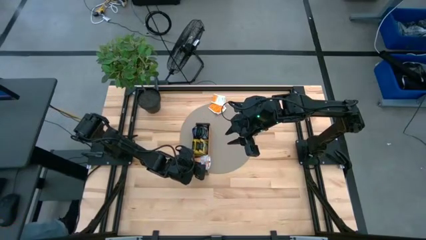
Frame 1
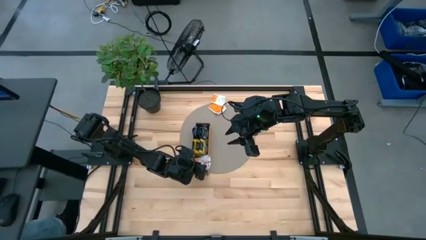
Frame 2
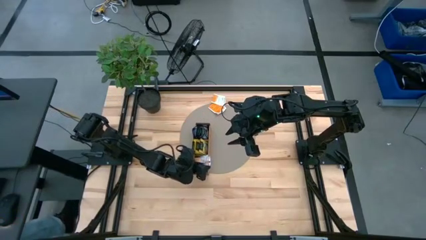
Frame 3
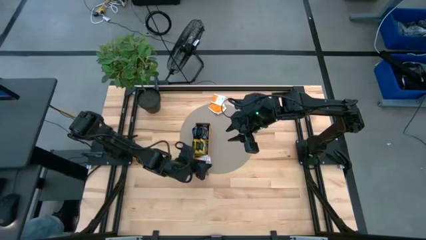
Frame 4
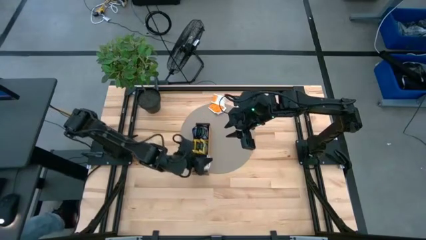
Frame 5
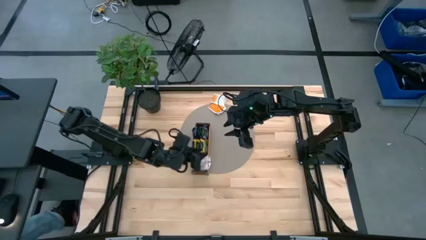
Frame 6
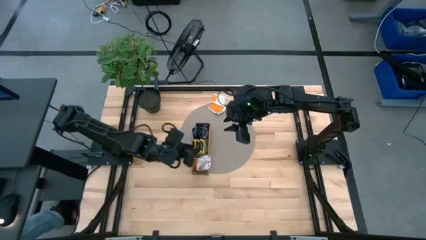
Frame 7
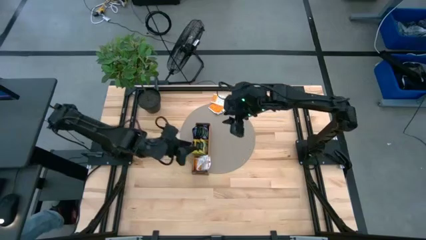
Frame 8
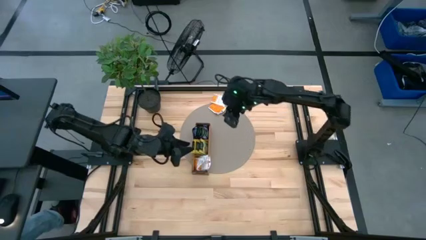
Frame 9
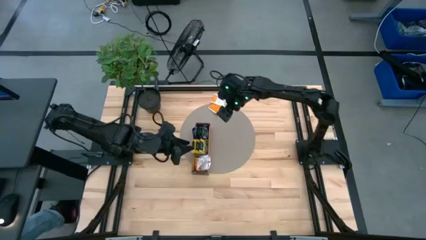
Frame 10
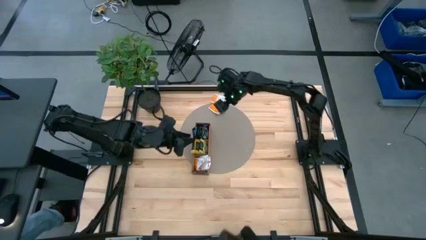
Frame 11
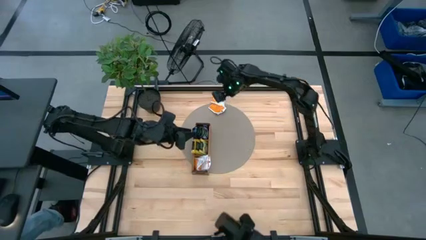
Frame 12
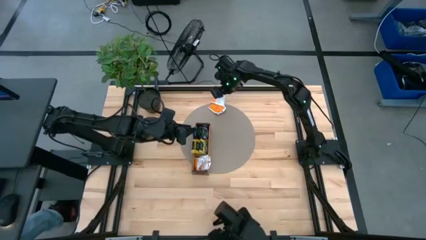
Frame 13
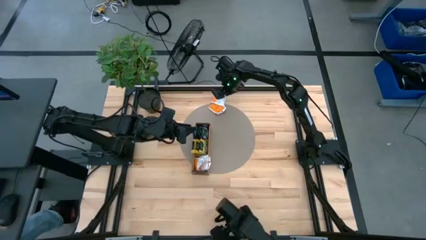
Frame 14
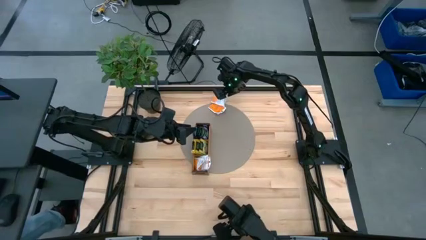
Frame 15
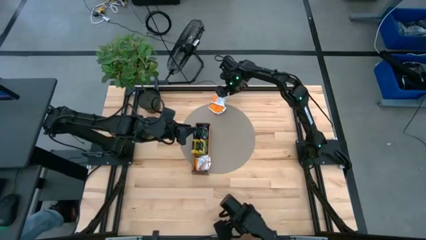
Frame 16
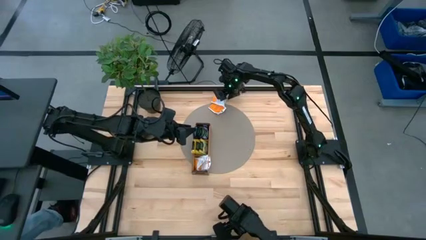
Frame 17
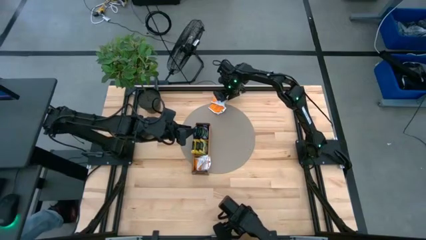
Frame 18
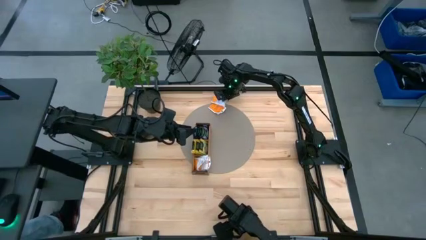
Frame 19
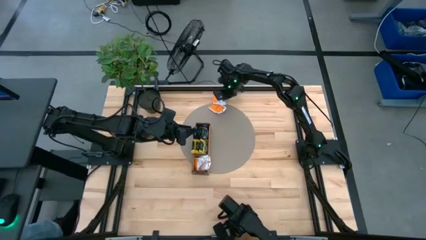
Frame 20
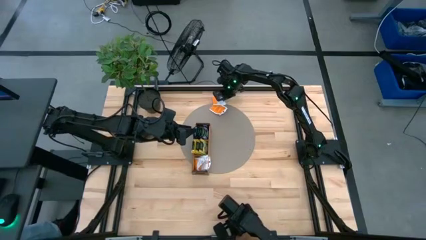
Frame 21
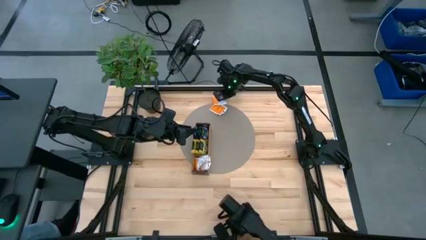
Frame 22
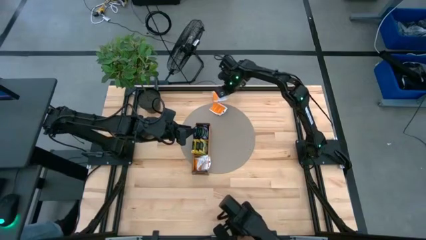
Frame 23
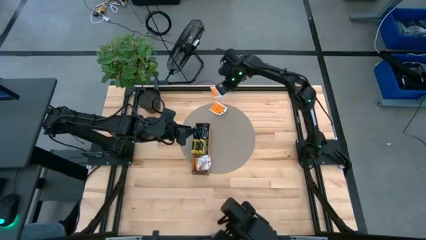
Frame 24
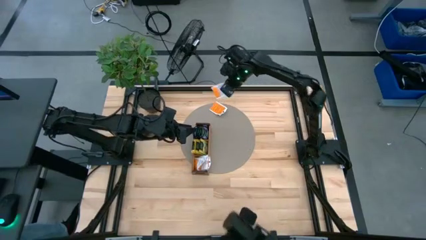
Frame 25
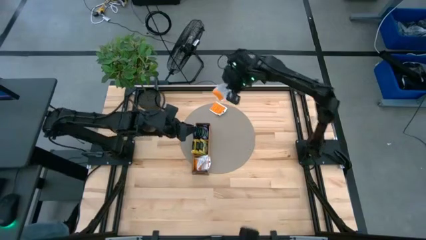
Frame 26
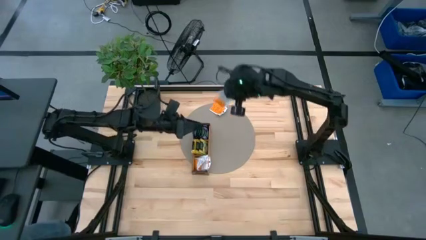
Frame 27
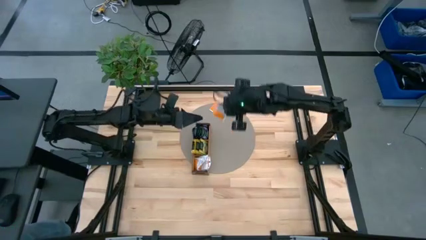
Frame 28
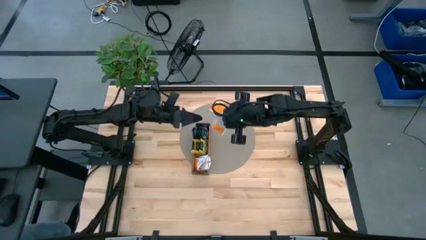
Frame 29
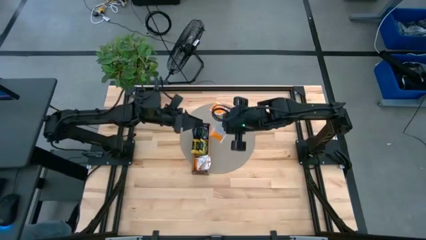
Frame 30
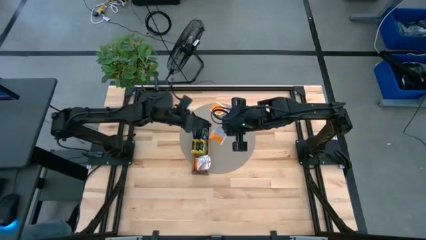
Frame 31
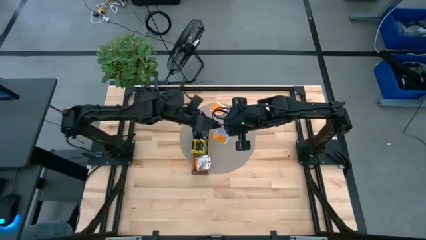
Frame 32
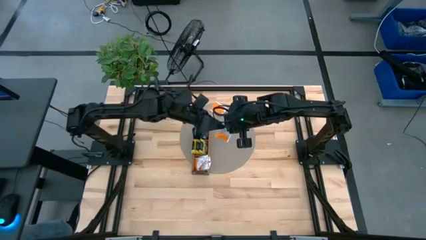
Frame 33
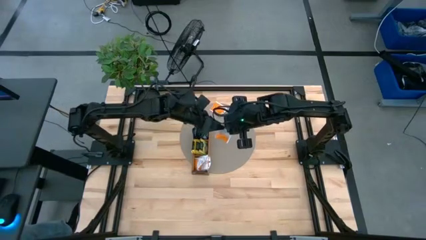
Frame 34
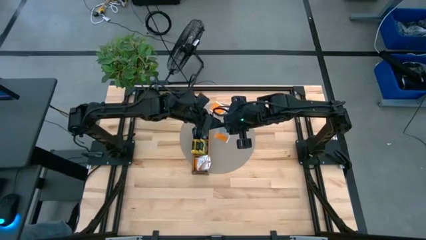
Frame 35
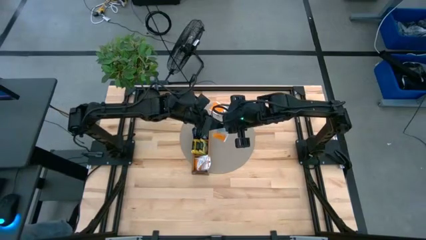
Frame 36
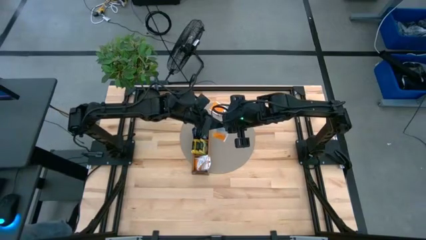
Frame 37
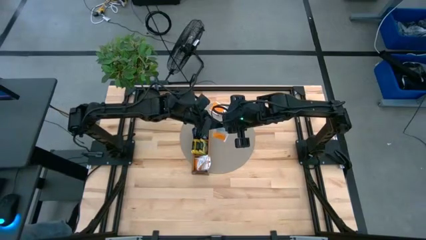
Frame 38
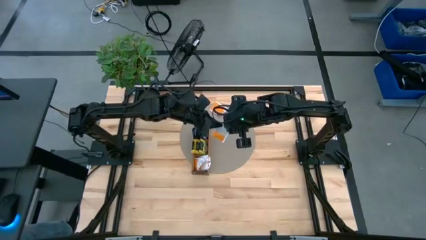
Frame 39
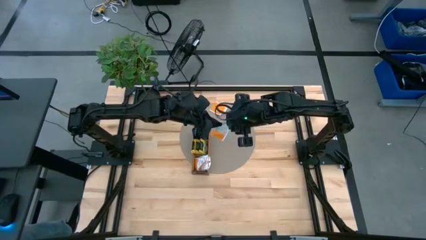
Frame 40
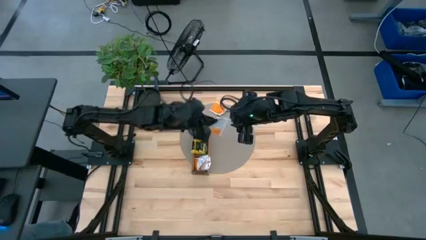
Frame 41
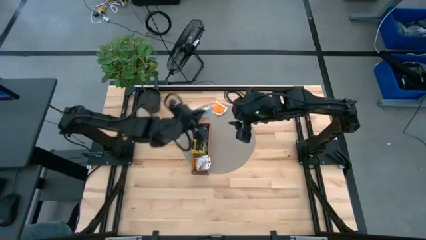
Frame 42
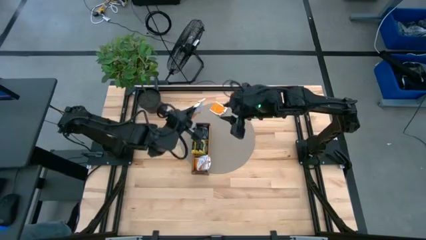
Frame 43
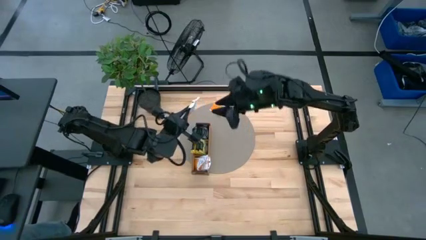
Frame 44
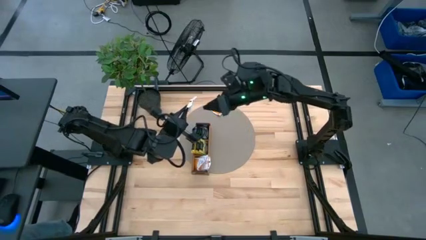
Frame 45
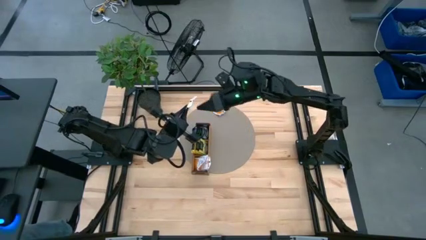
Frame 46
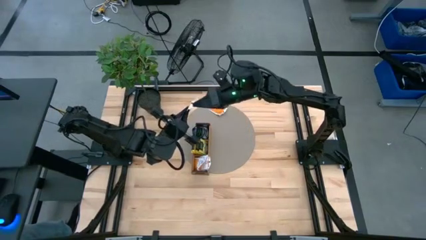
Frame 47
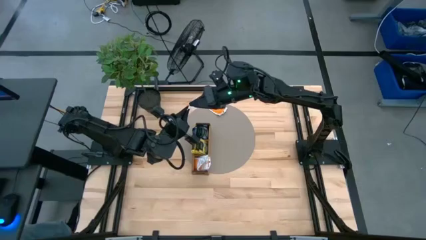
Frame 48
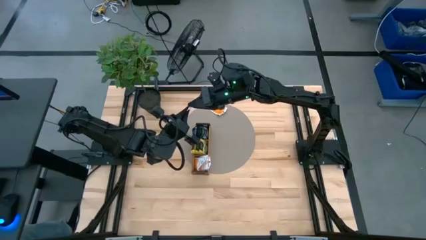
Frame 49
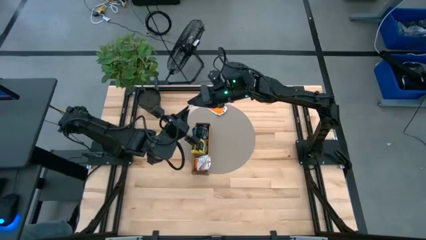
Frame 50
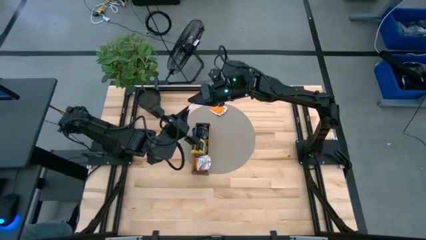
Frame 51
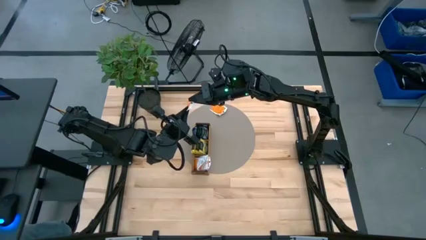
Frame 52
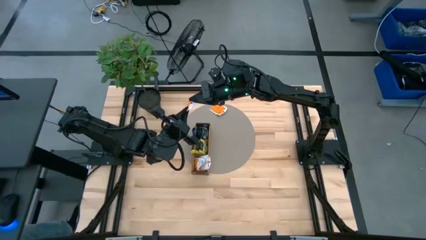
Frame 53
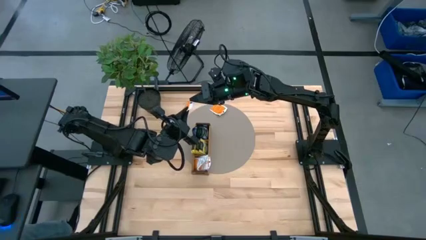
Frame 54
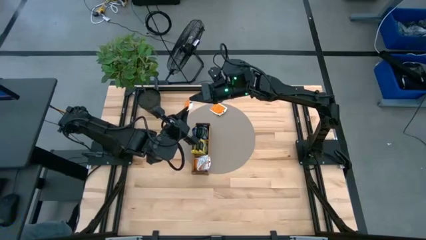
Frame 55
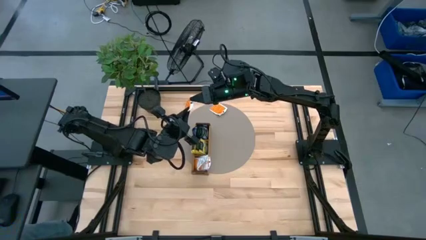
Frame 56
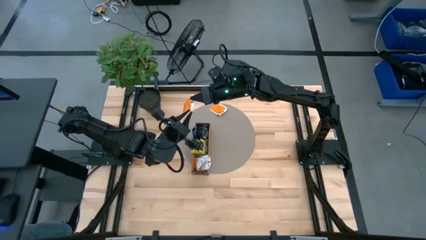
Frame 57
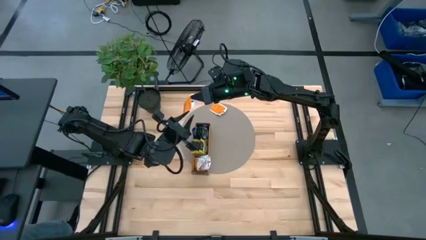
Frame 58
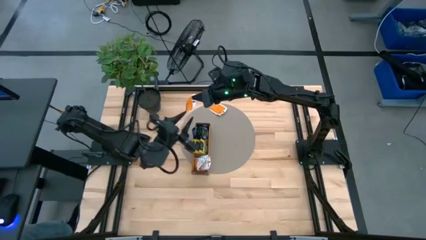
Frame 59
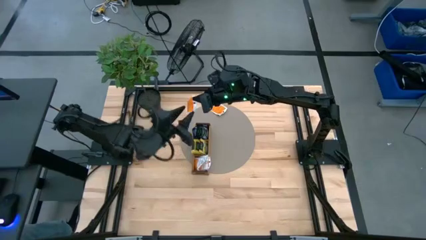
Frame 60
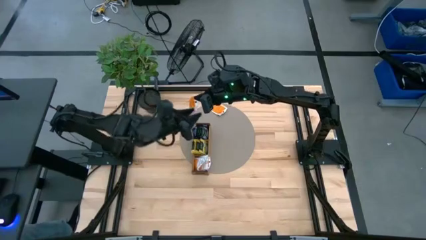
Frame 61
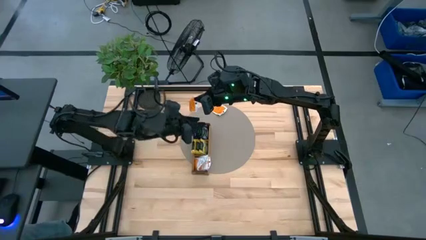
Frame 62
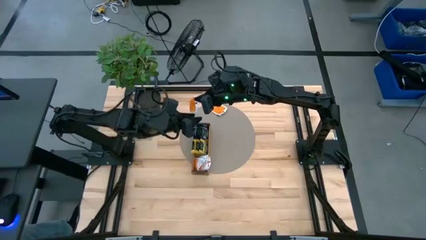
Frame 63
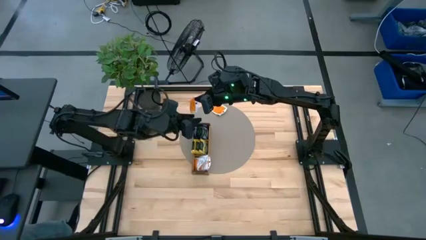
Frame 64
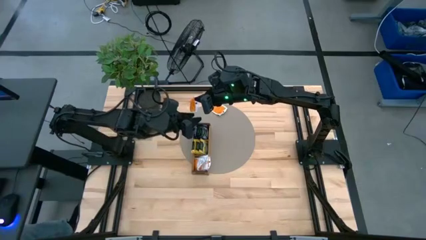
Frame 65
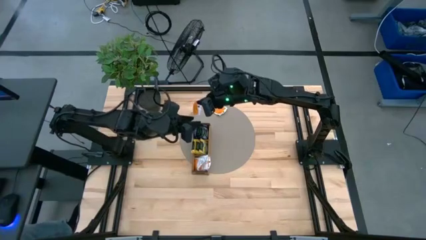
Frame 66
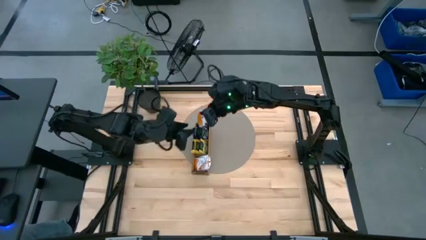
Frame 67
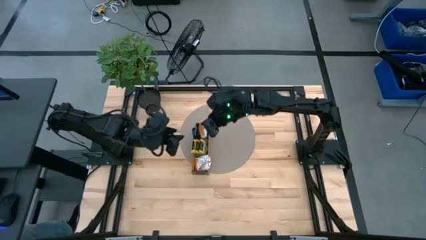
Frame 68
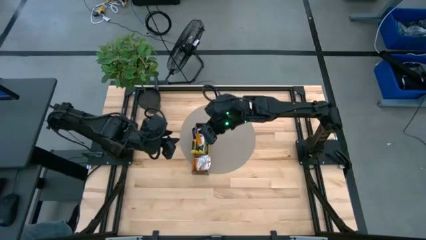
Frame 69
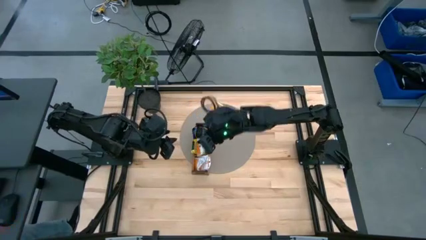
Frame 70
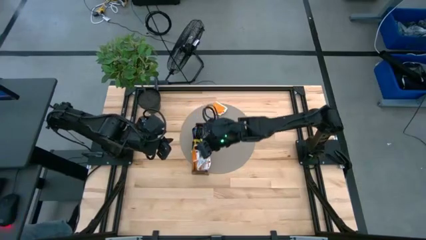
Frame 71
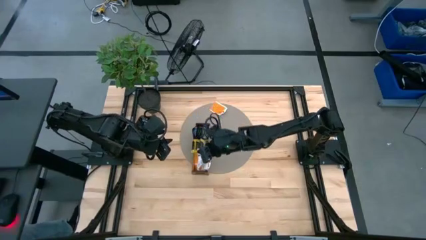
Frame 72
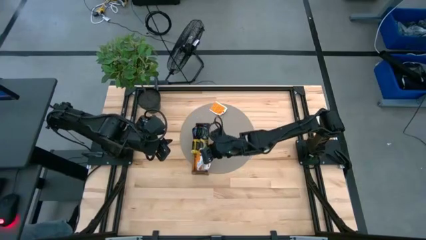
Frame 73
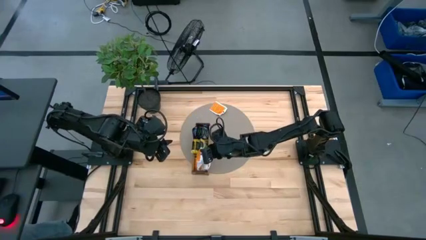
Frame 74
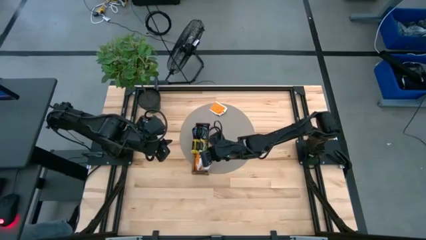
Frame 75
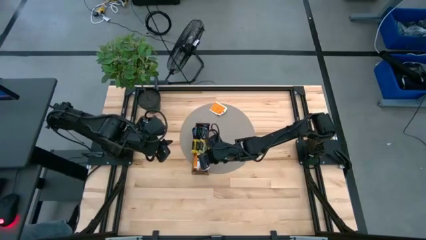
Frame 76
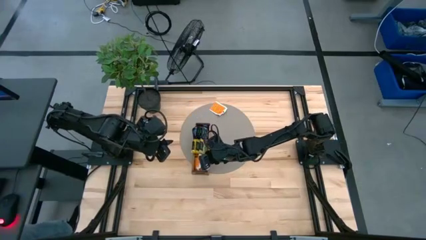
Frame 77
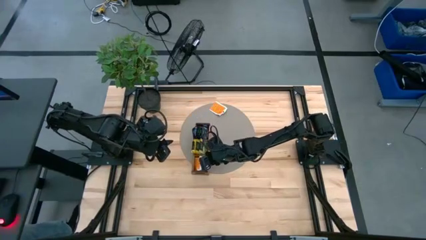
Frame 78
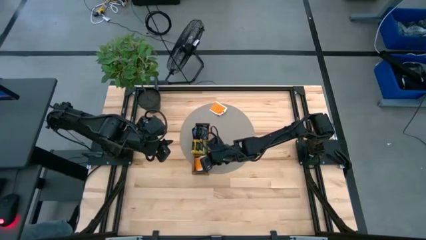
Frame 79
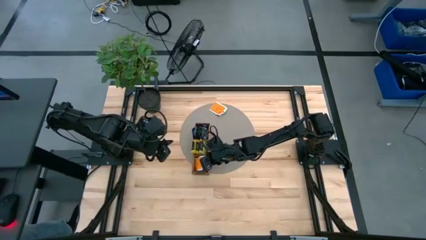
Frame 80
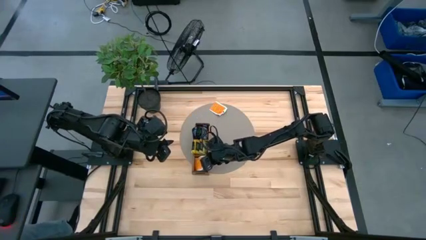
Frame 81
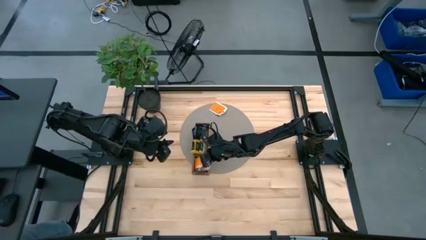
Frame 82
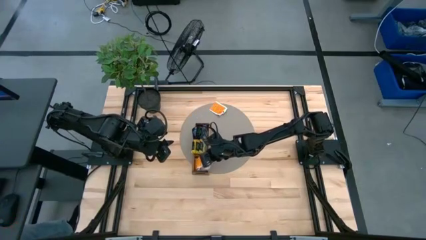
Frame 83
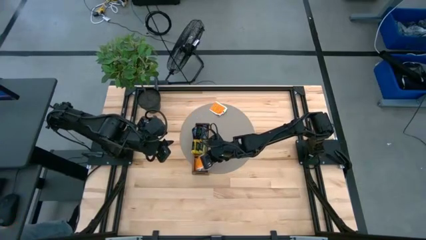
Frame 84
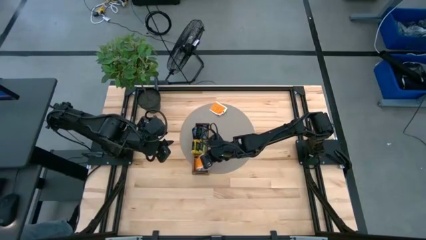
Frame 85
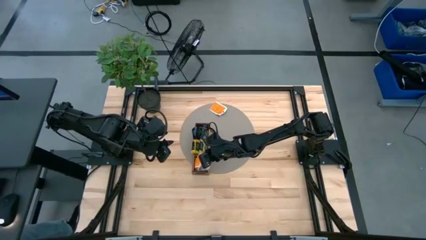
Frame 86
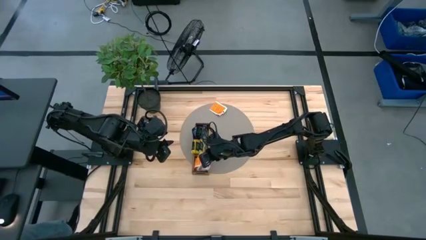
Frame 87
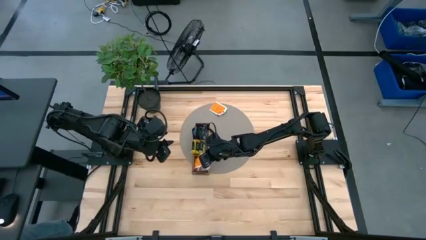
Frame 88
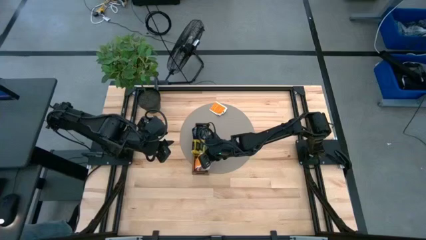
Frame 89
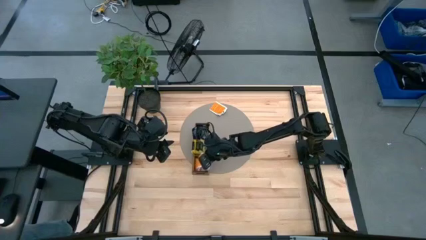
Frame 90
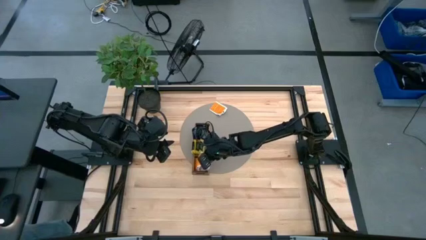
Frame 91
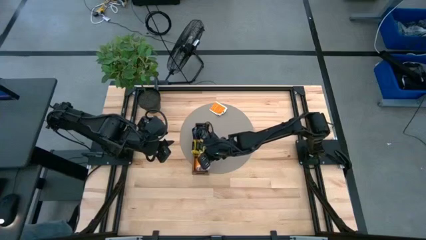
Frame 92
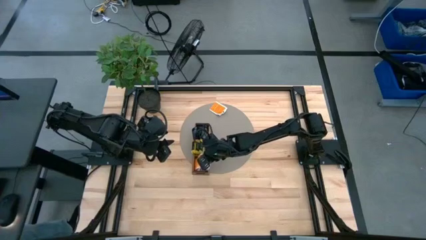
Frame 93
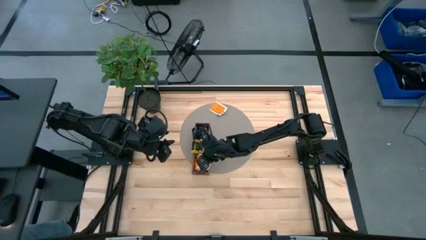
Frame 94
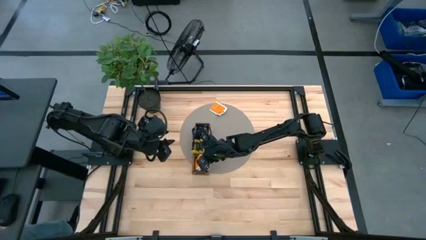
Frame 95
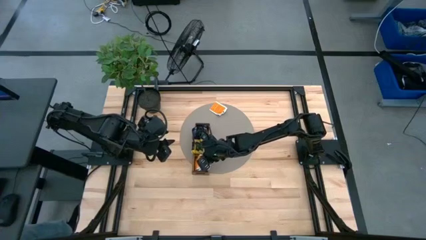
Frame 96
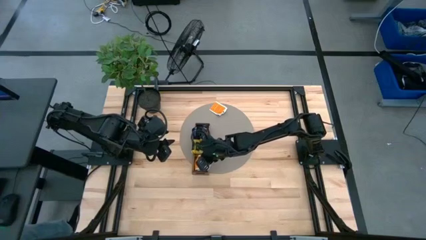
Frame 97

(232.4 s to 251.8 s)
Task: Pick & Place Tea
Put the white tea bag into the bottom section of the wooden organizer
